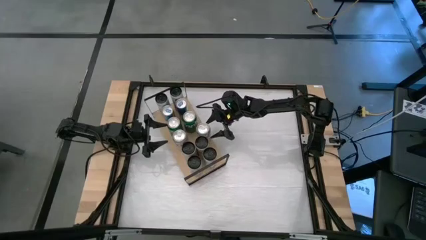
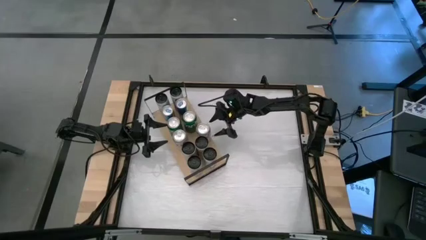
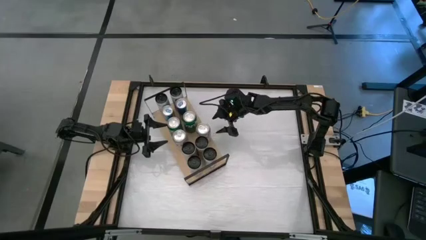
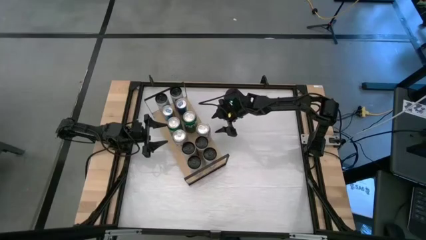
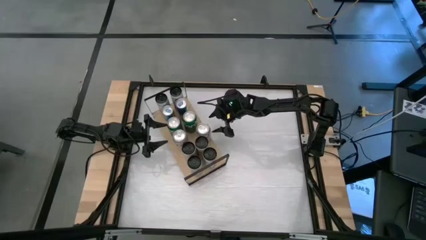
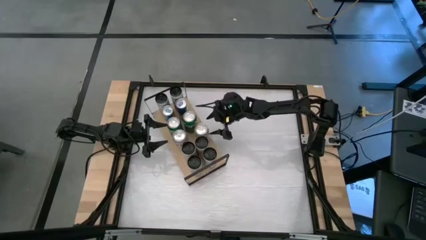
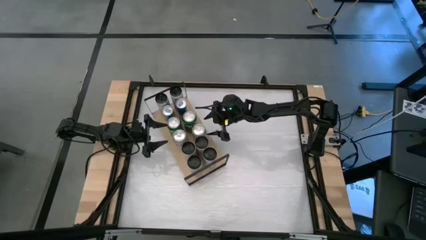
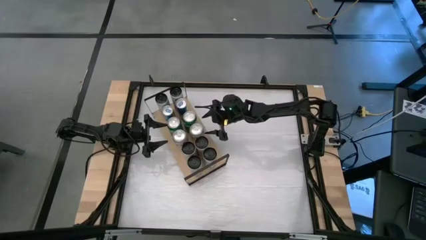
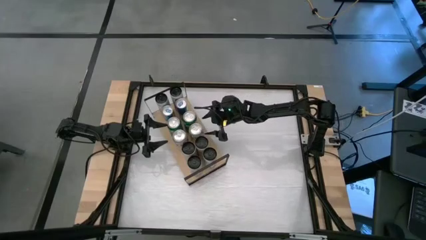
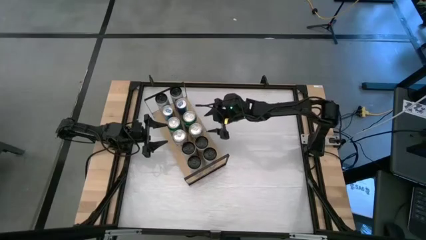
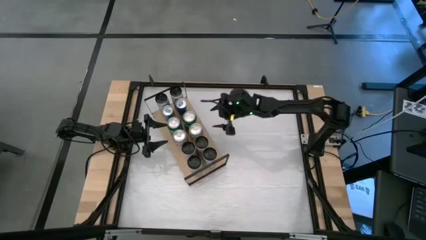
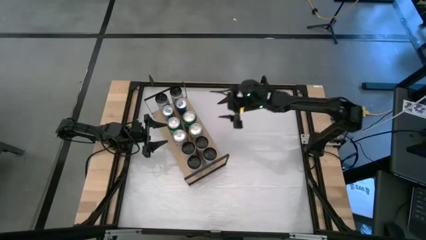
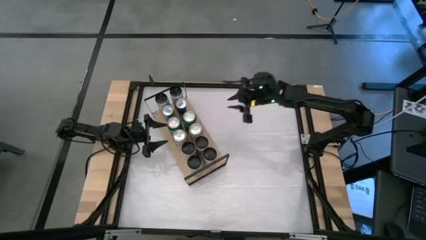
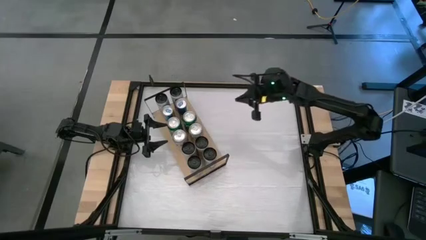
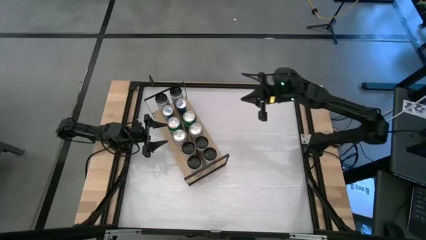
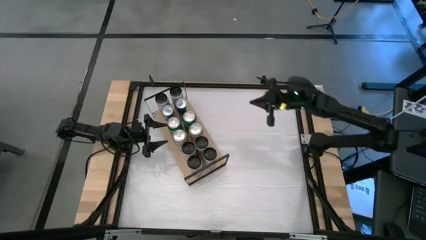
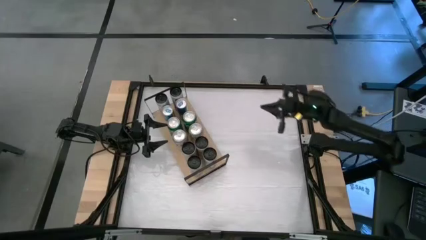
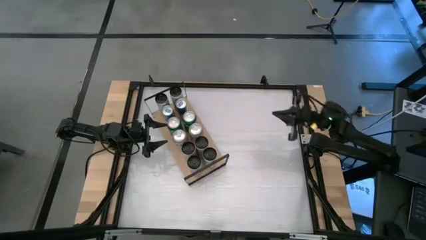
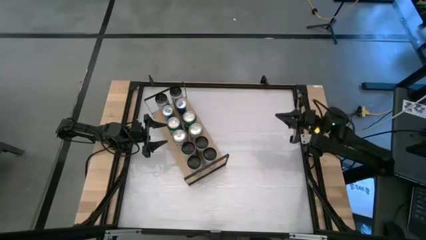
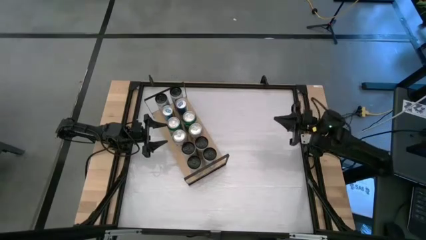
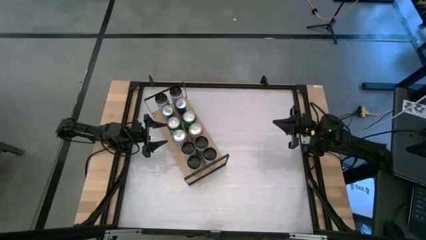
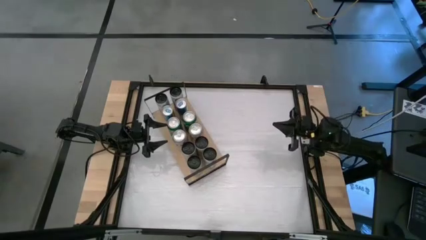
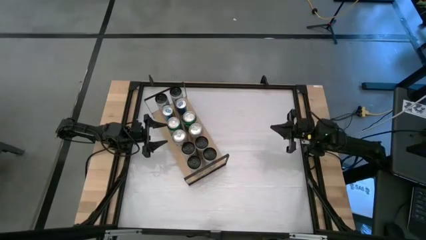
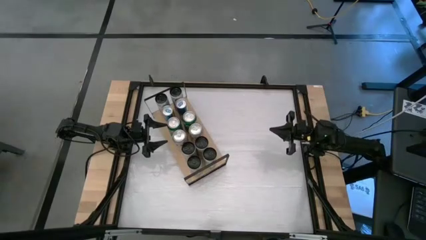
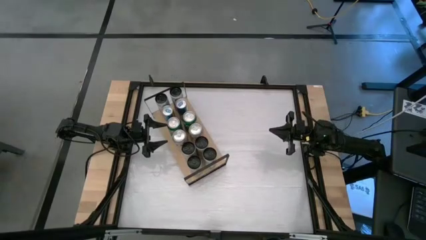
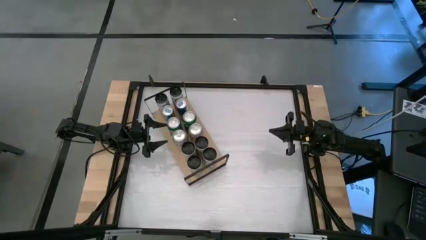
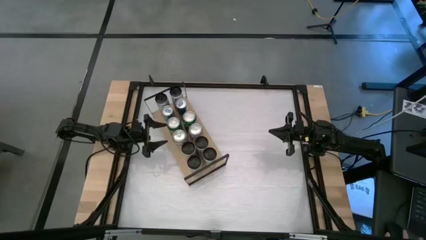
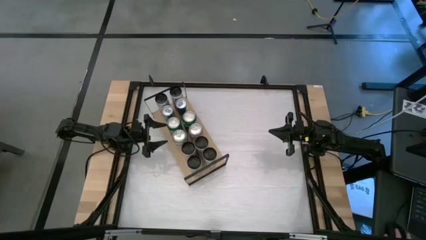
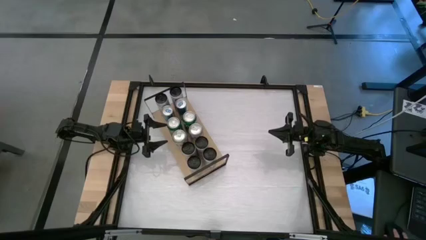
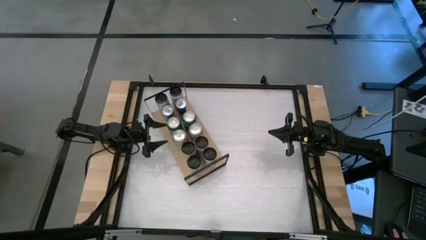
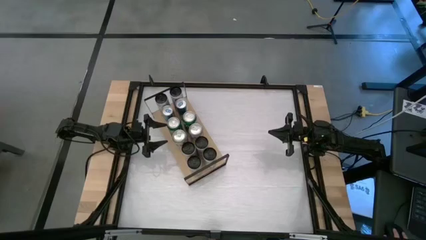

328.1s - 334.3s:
Task: Place canned beverage on shelf
Return to Home Position
